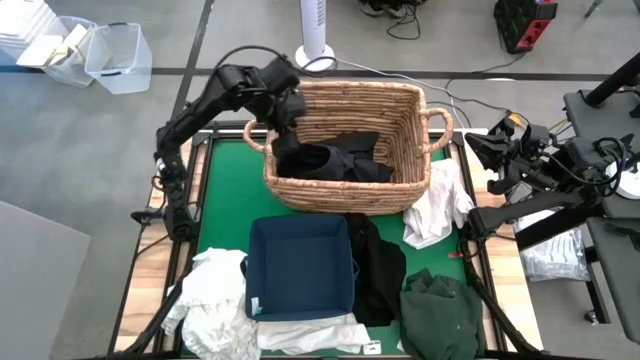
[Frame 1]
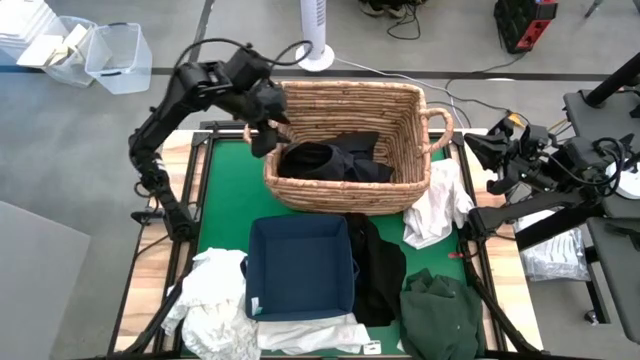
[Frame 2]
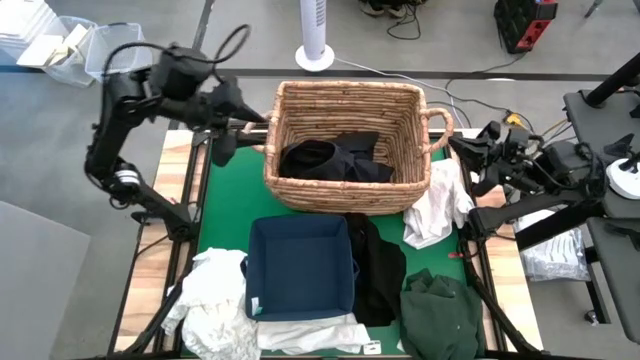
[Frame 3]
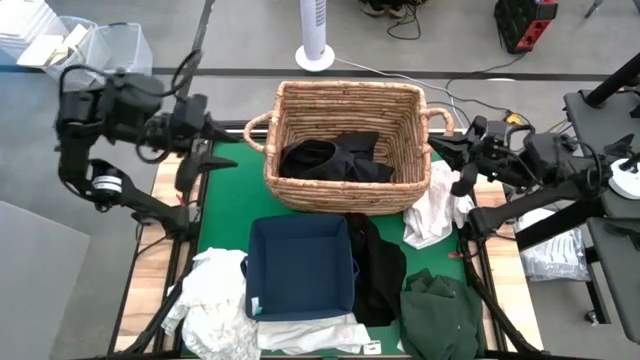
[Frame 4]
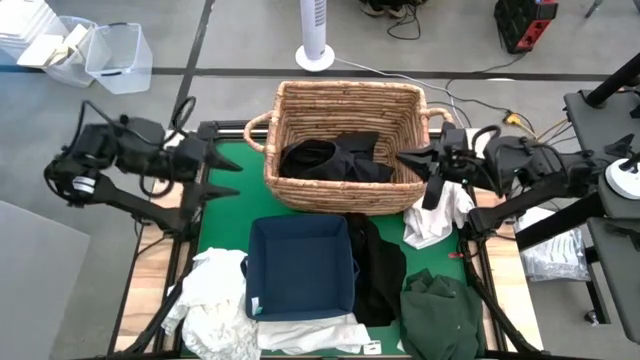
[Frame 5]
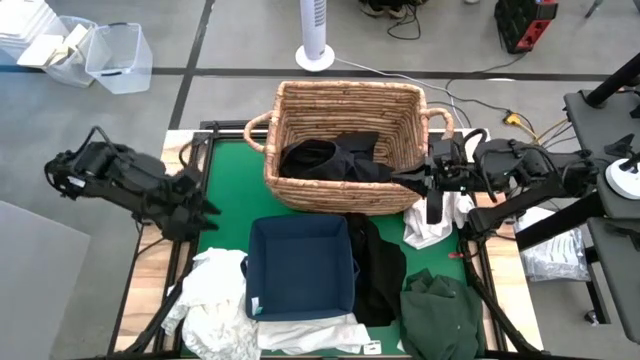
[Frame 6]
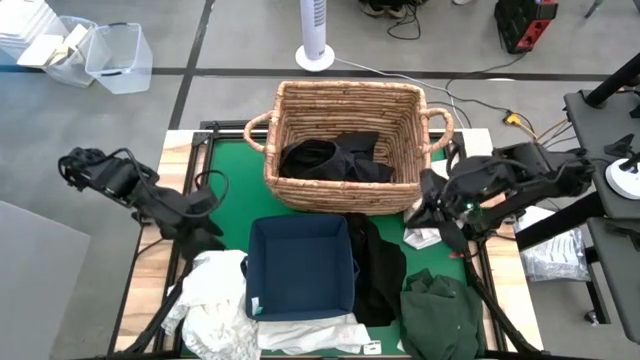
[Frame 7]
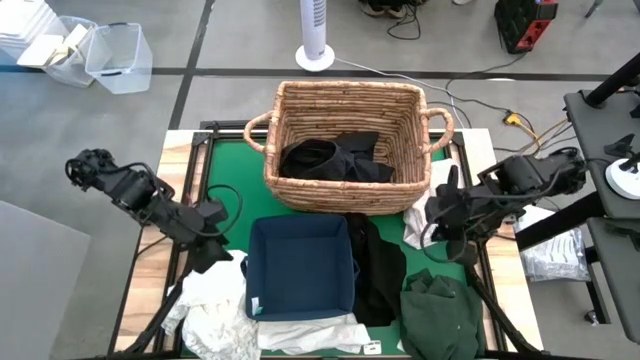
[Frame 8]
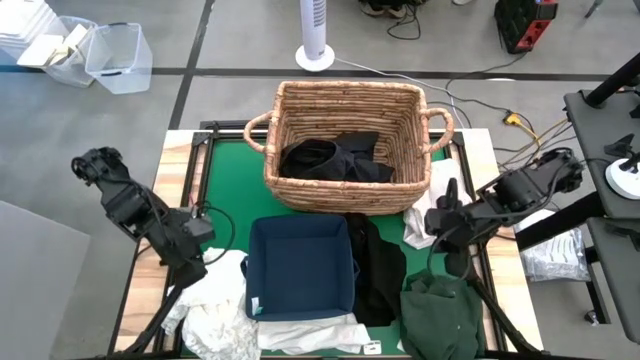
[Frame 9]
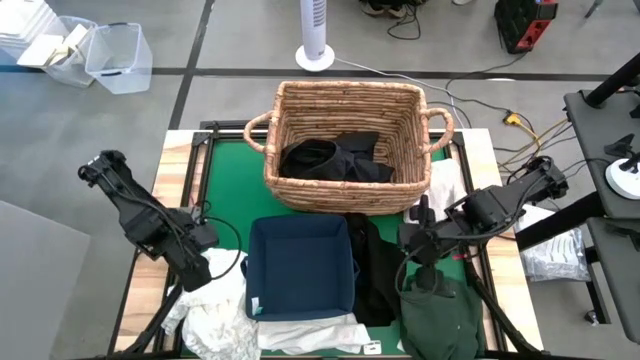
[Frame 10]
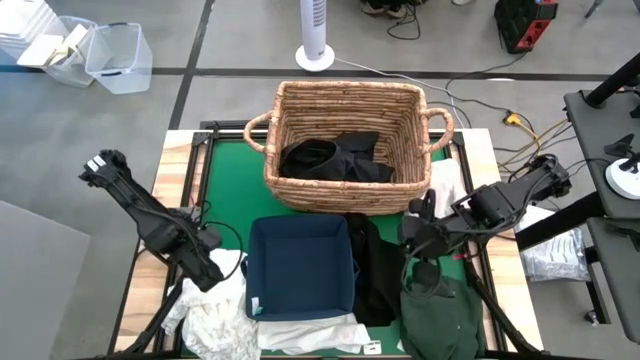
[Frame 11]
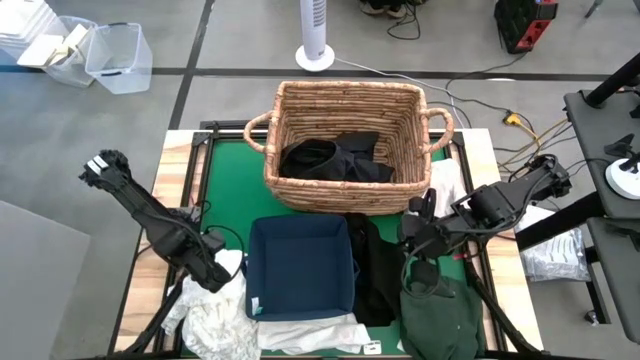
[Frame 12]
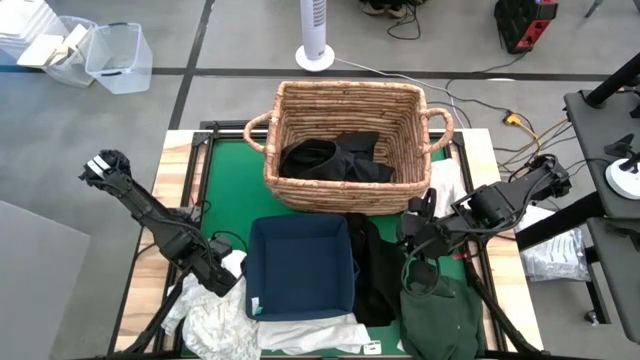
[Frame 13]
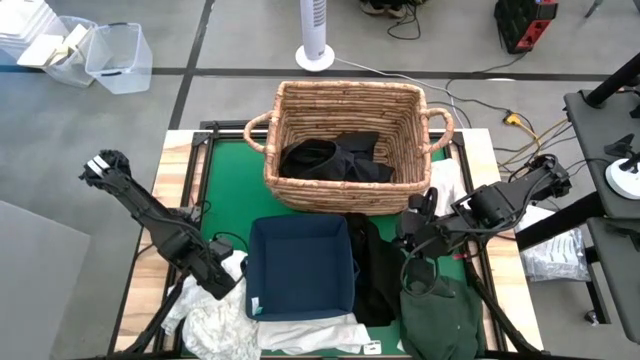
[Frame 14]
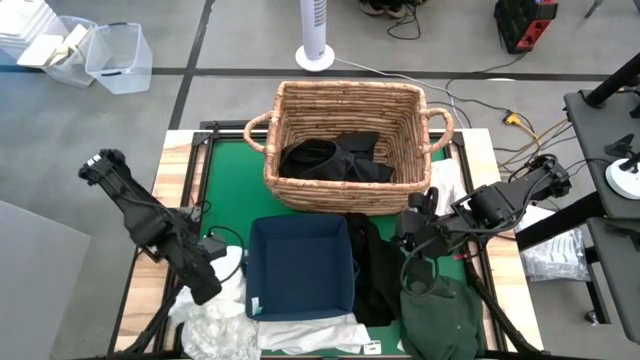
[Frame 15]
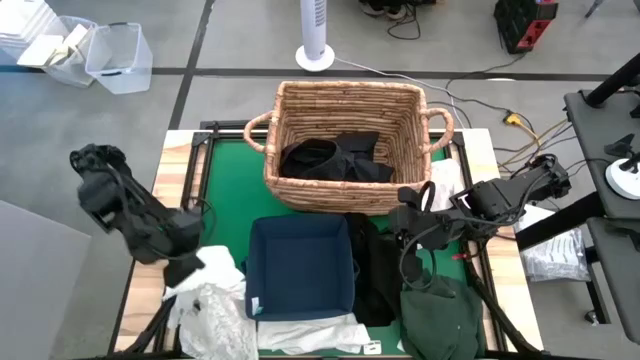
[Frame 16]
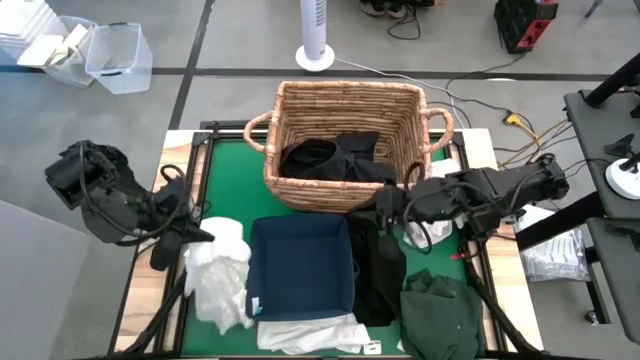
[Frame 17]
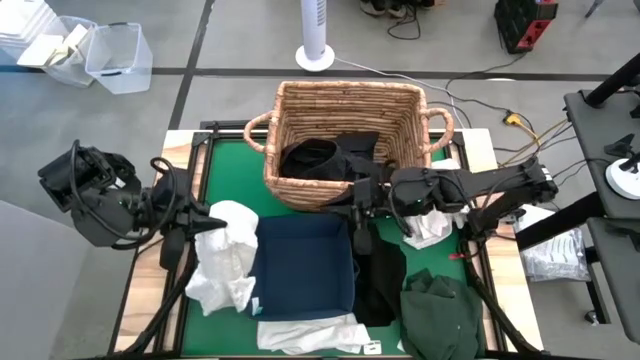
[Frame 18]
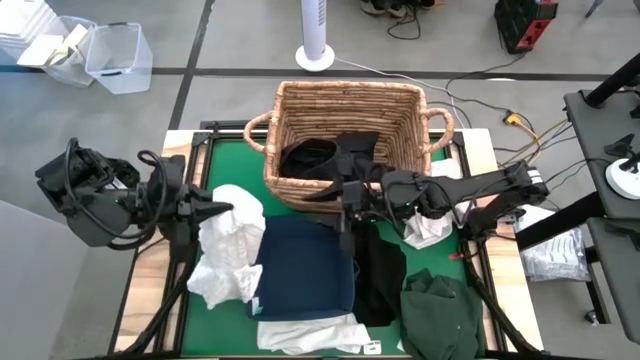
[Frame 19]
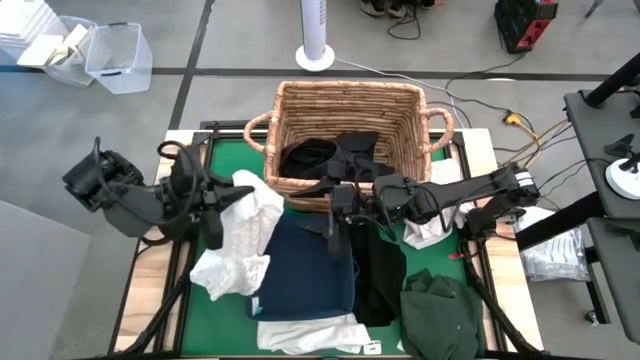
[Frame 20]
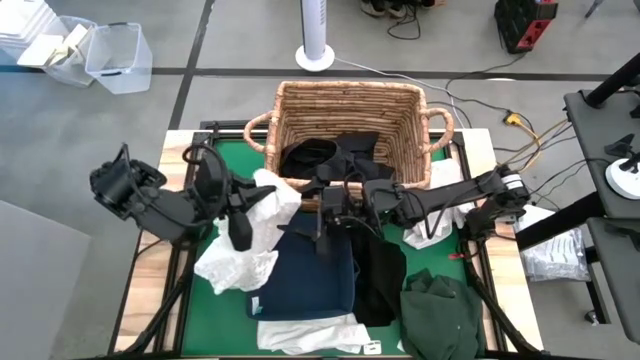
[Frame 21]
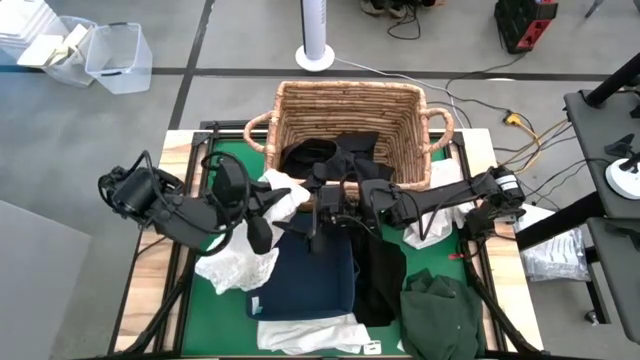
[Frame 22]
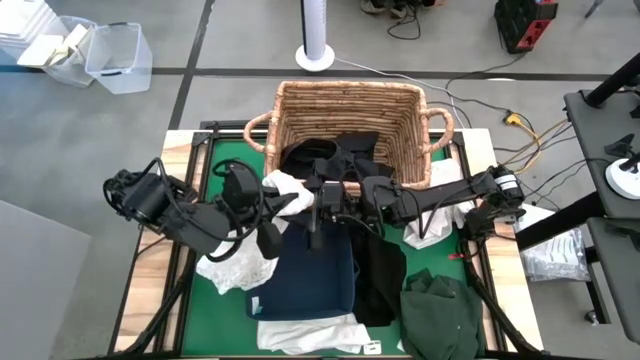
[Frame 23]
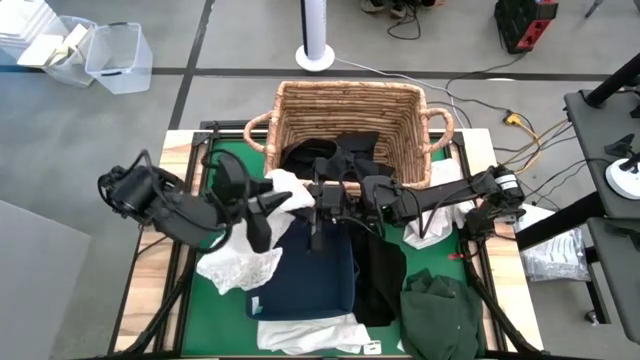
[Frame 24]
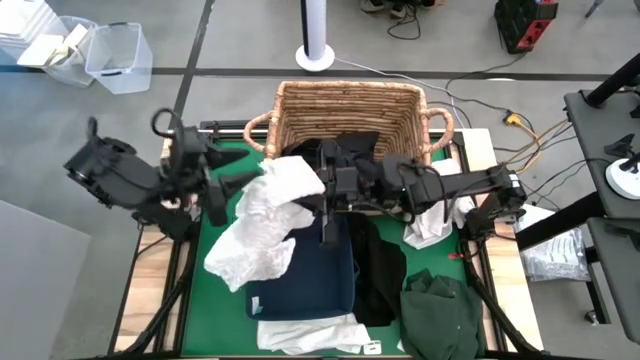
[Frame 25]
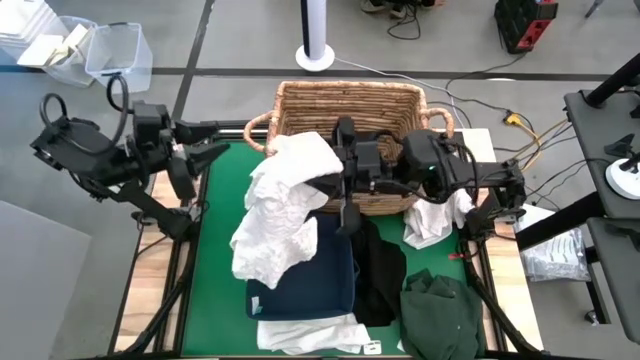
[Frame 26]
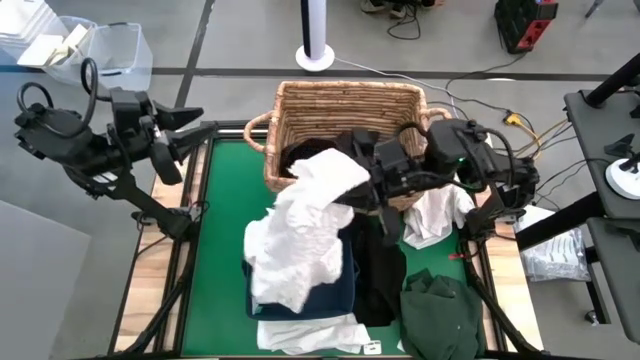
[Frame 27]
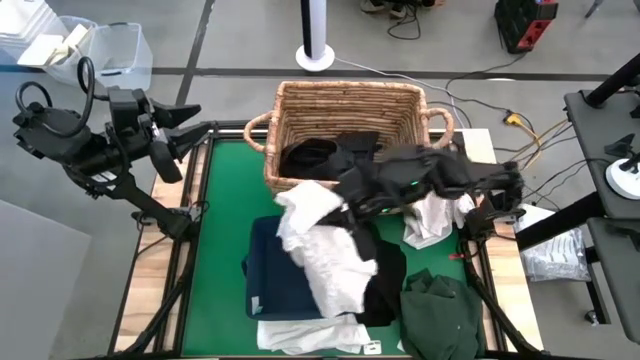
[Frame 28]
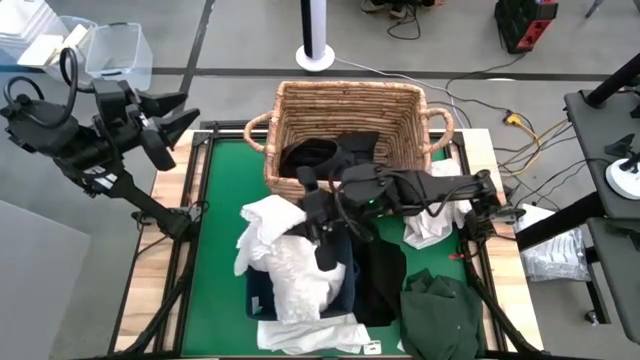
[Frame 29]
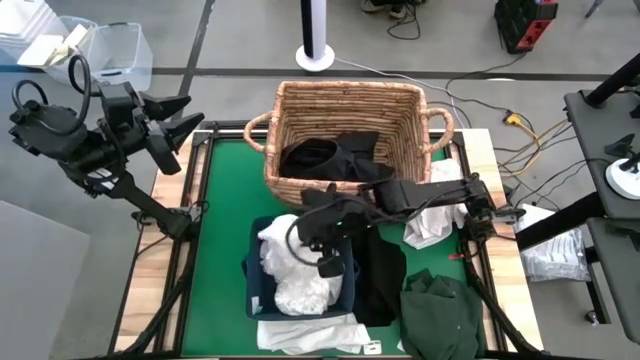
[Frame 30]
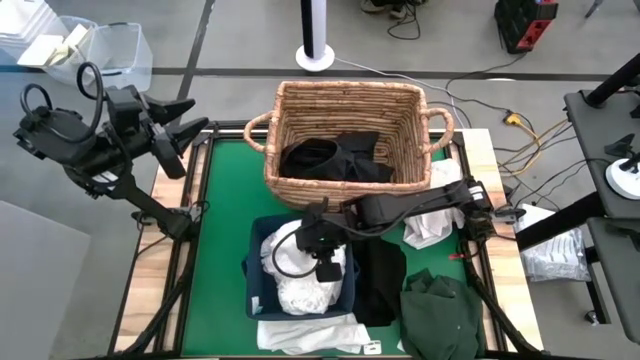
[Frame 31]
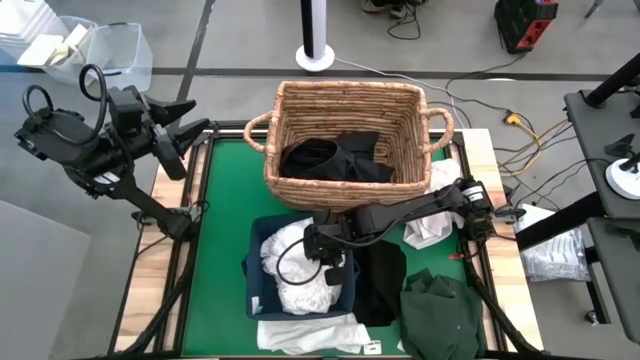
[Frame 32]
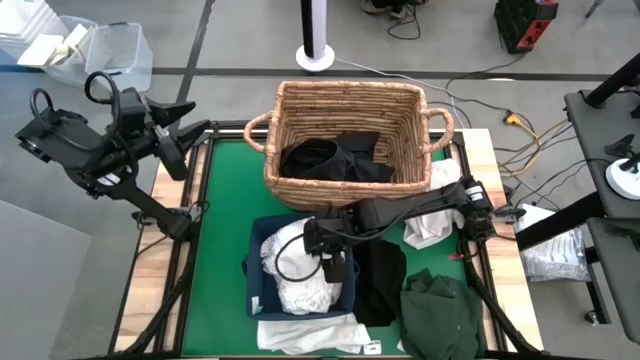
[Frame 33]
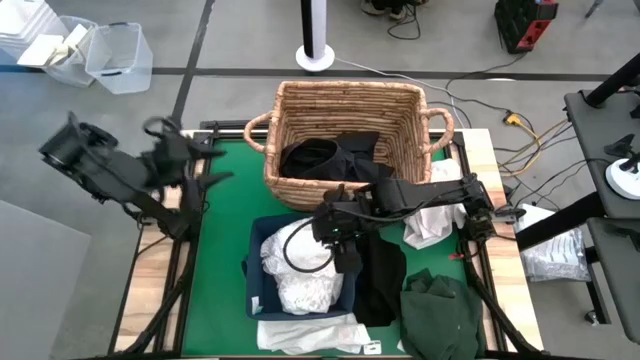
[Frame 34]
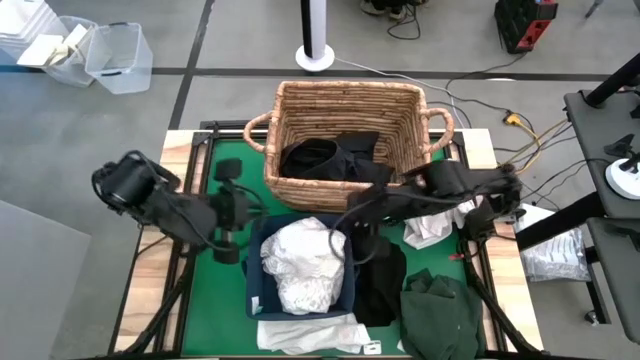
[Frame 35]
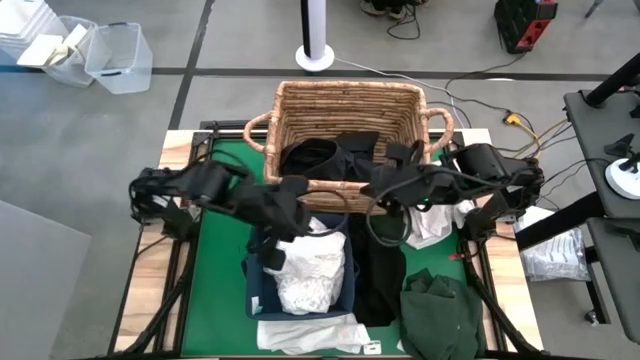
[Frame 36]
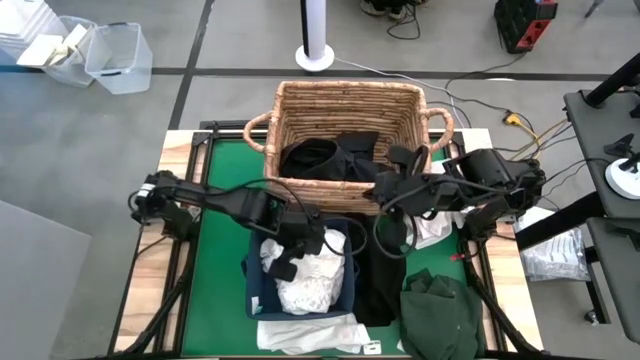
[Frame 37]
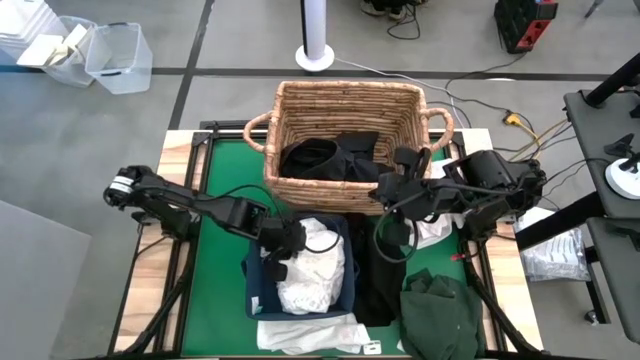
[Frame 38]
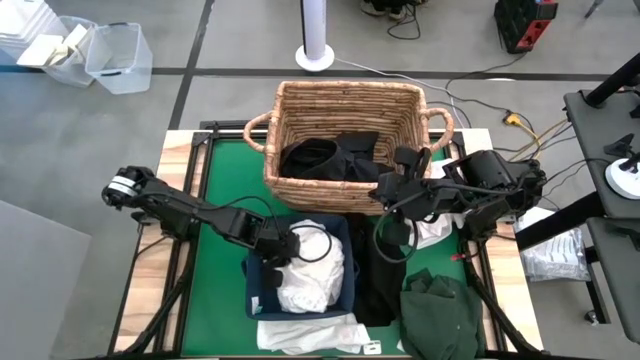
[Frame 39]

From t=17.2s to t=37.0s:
Put the left white blouse into the blue laundry organizer
